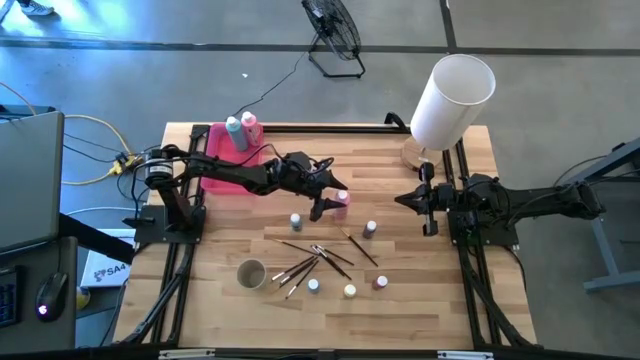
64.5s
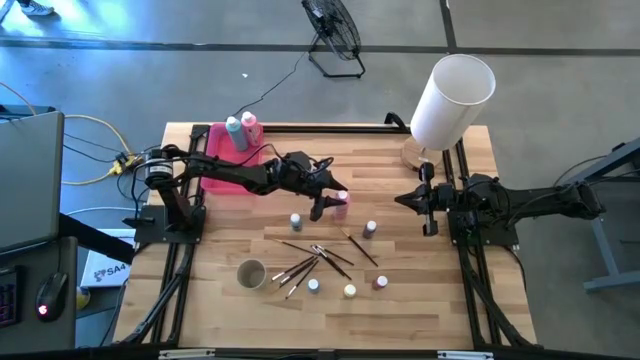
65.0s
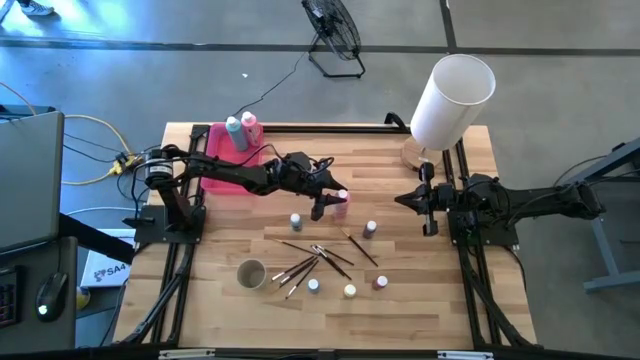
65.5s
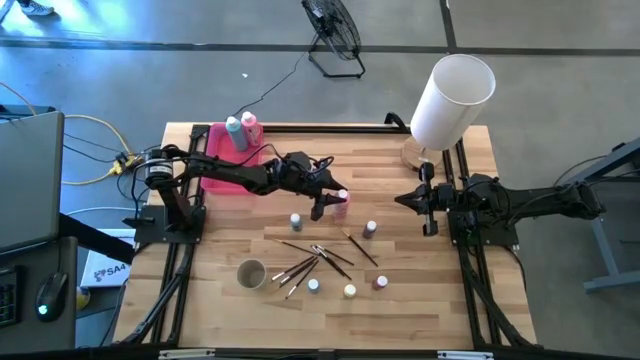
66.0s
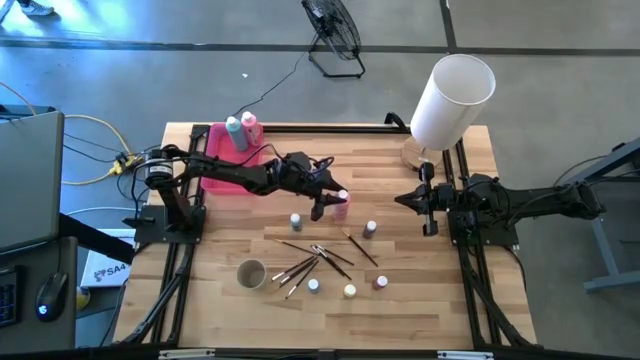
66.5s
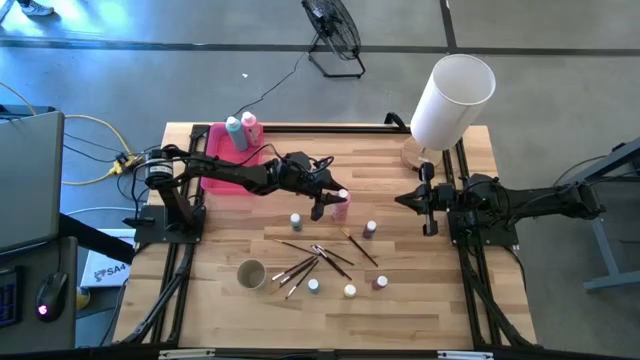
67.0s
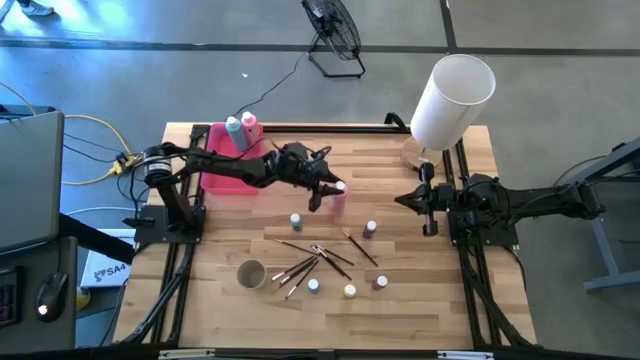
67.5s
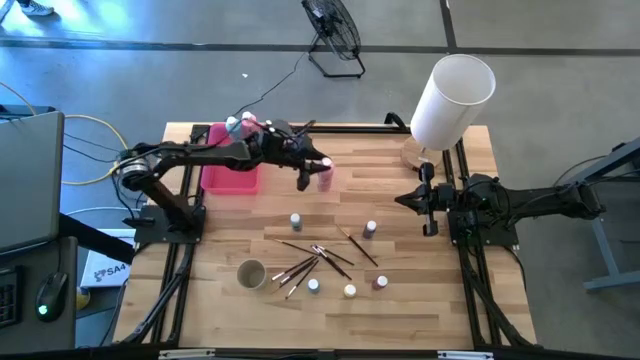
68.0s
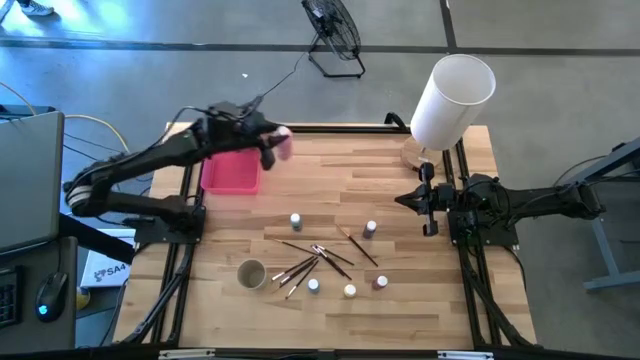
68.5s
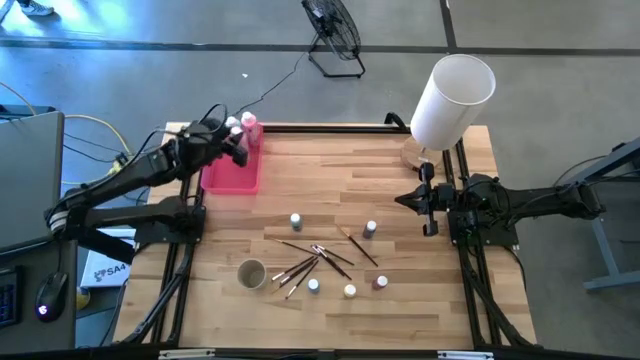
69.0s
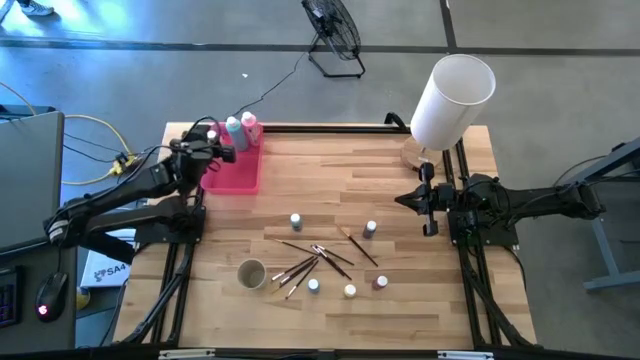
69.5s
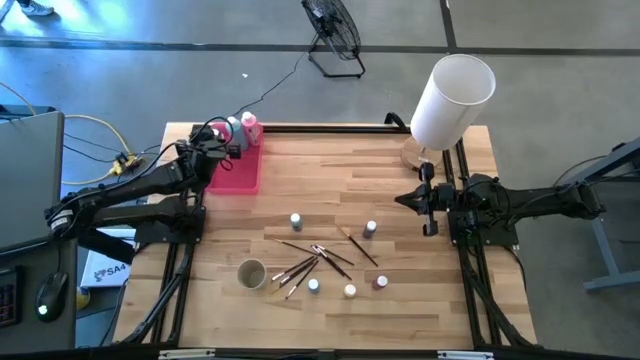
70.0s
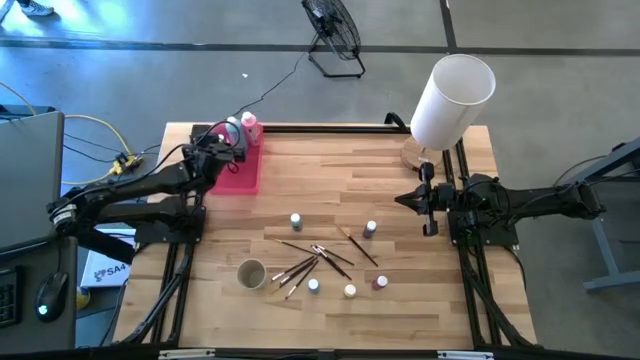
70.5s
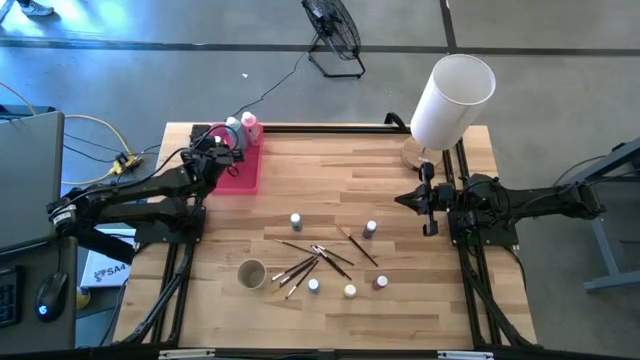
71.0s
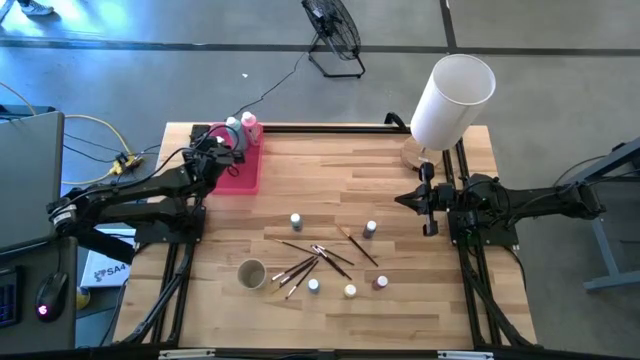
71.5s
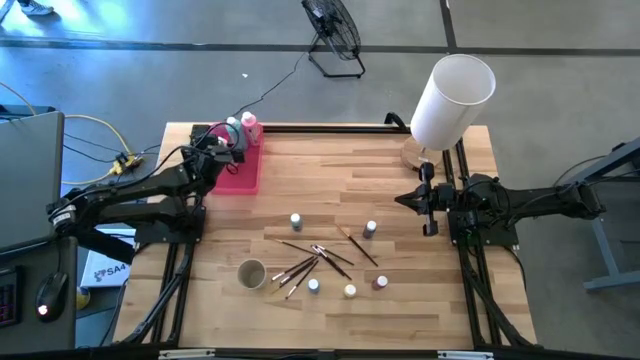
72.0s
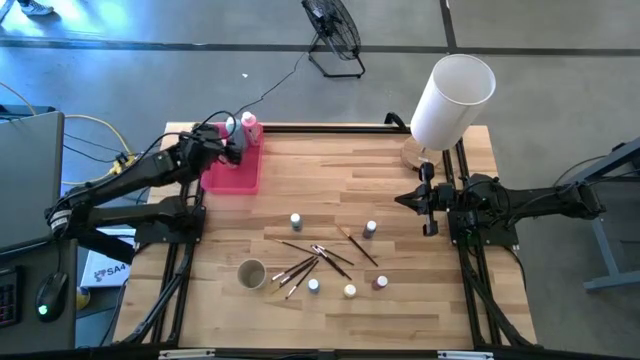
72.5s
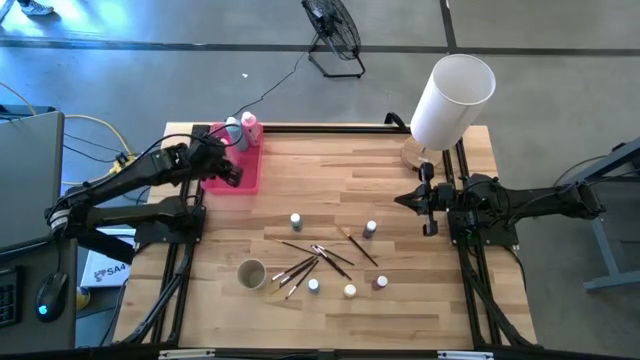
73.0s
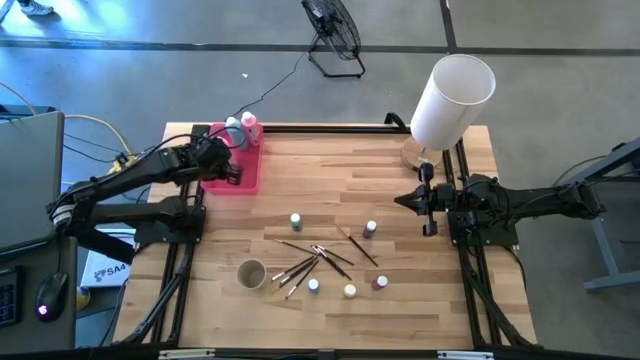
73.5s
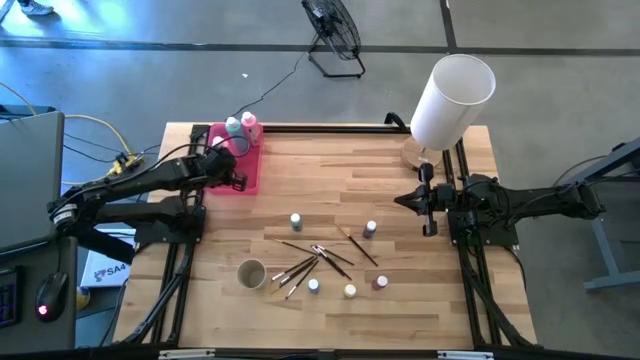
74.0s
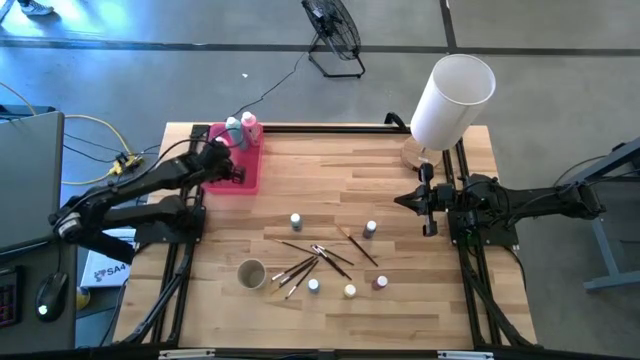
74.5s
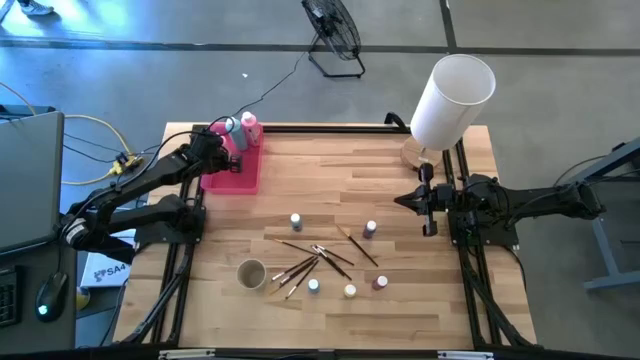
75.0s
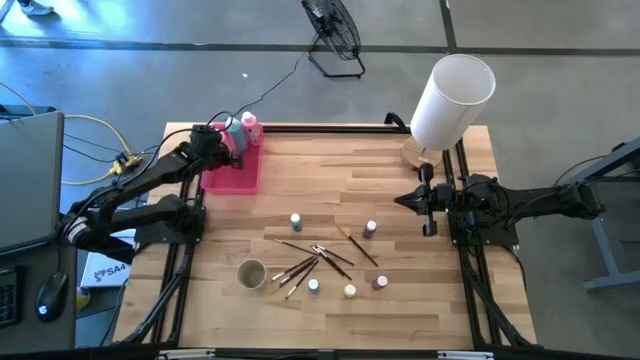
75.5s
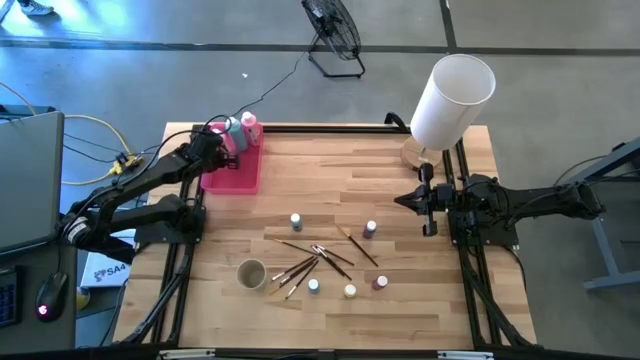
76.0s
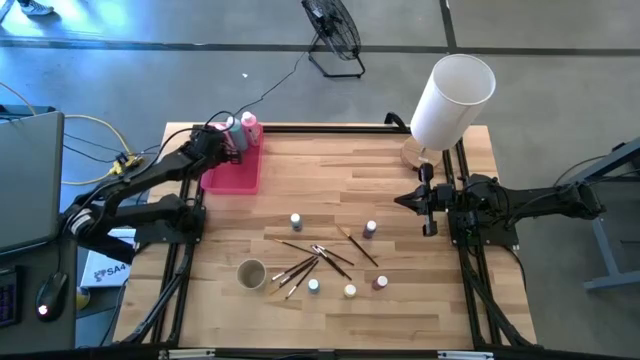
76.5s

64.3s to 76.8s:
Task: Pick & Place Paint Supplies
Put the big pink paint bottle into the pink bin
